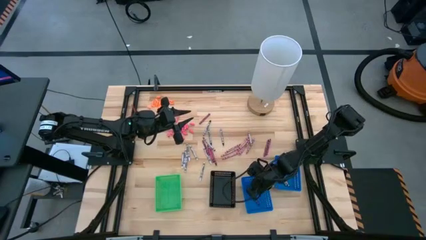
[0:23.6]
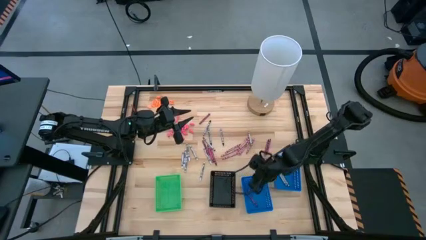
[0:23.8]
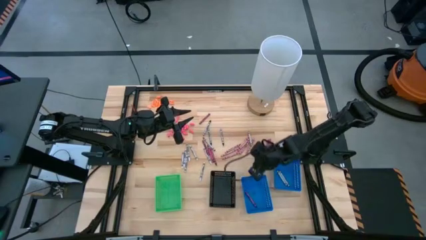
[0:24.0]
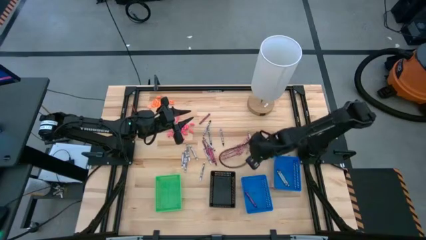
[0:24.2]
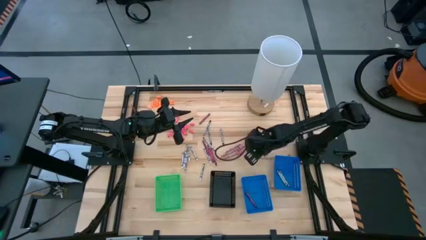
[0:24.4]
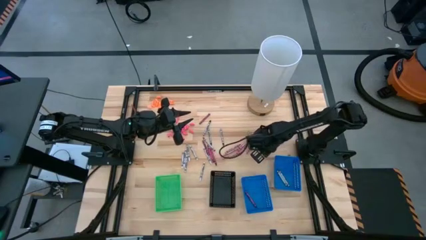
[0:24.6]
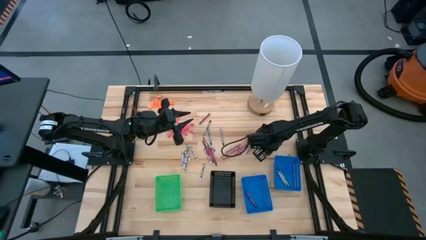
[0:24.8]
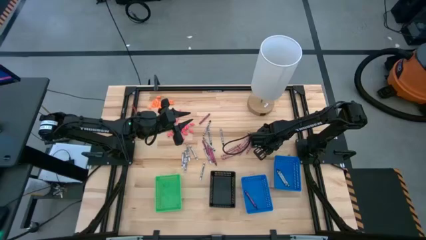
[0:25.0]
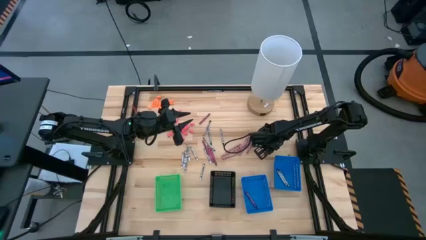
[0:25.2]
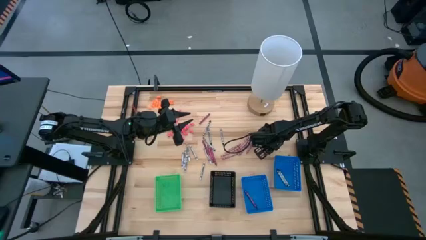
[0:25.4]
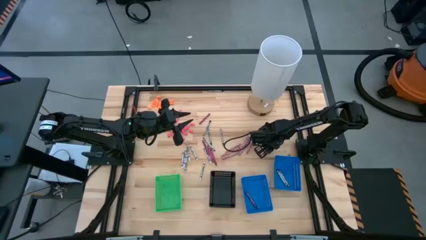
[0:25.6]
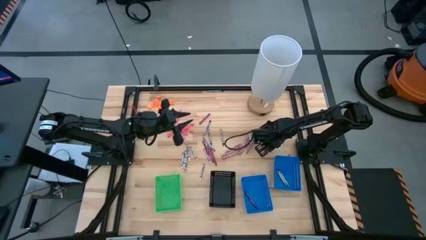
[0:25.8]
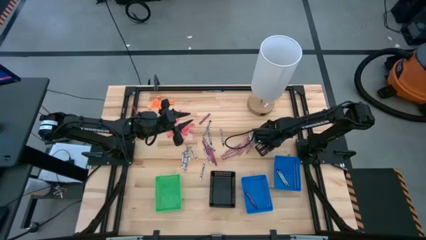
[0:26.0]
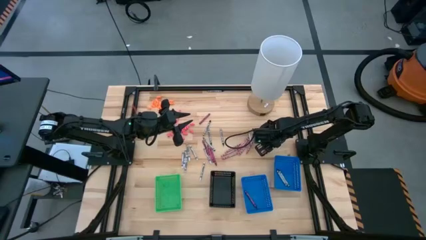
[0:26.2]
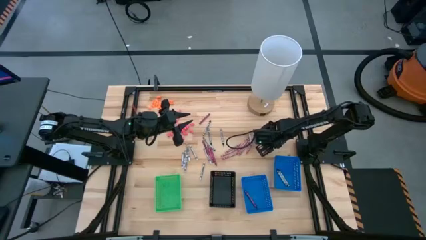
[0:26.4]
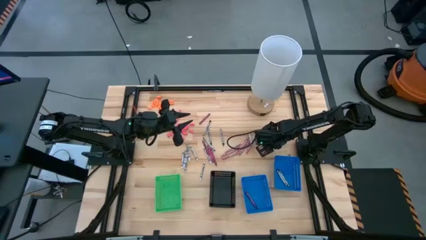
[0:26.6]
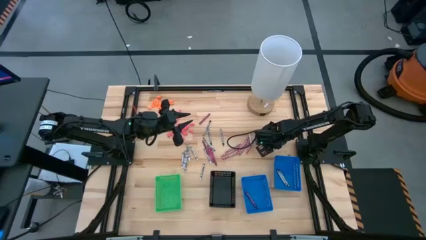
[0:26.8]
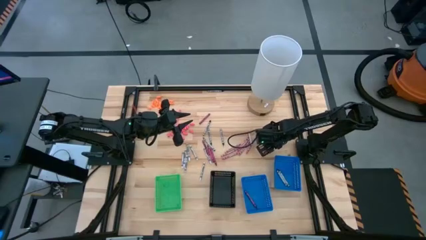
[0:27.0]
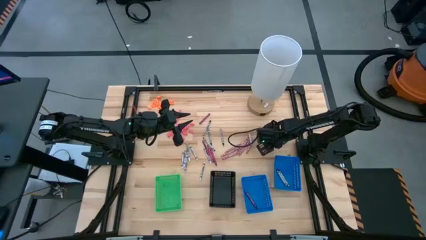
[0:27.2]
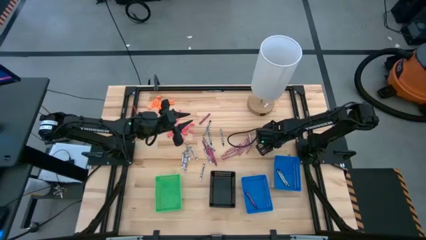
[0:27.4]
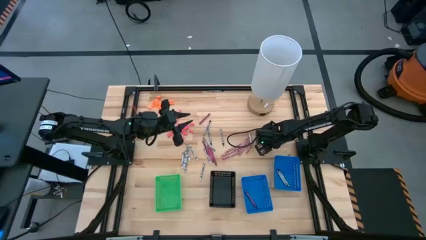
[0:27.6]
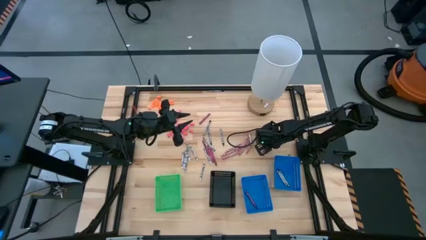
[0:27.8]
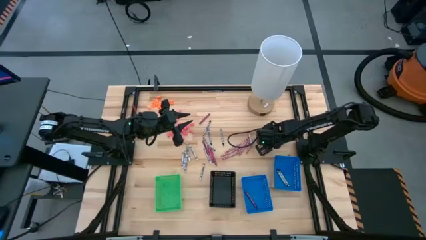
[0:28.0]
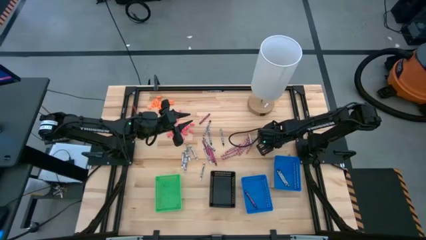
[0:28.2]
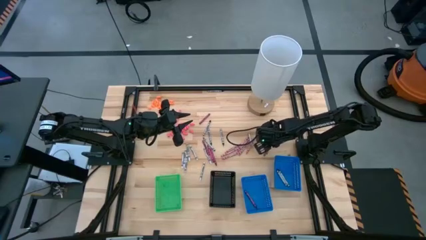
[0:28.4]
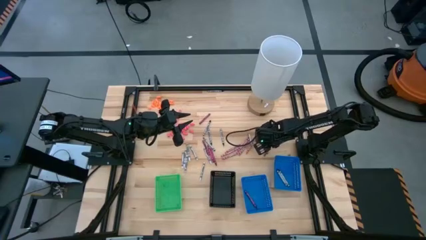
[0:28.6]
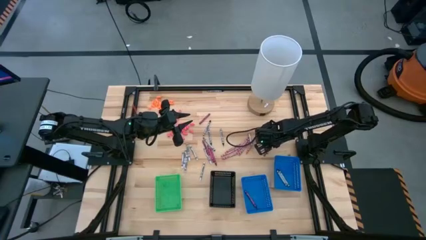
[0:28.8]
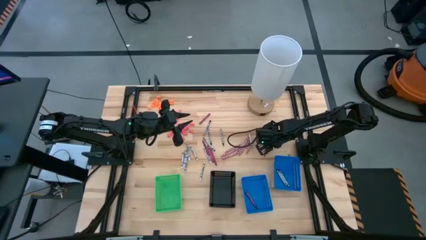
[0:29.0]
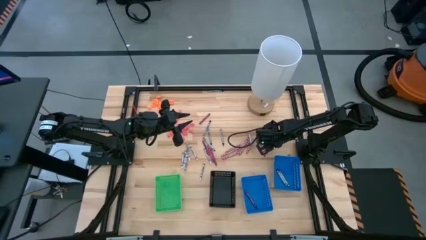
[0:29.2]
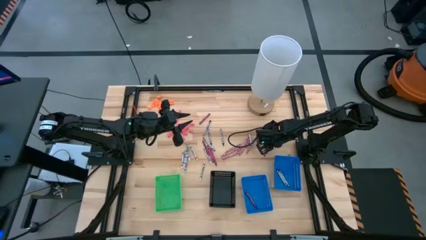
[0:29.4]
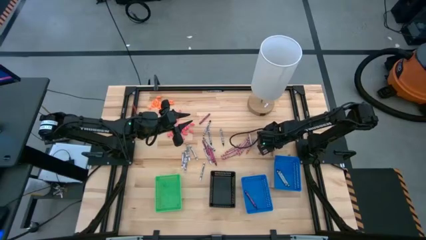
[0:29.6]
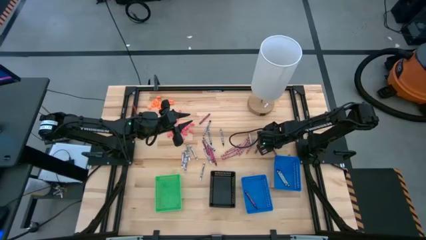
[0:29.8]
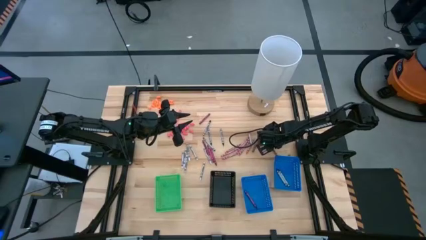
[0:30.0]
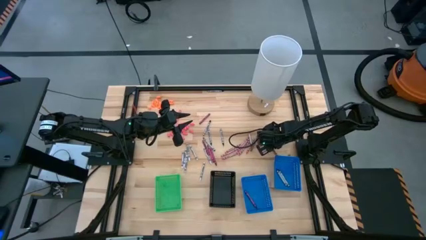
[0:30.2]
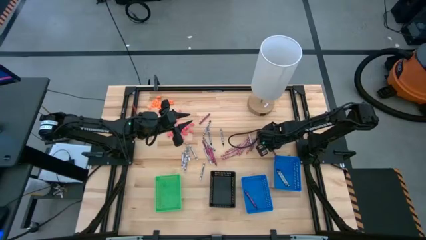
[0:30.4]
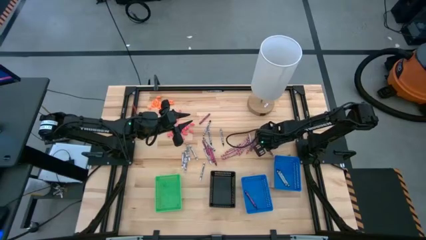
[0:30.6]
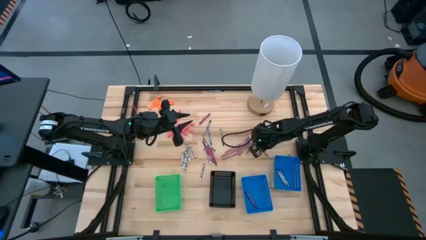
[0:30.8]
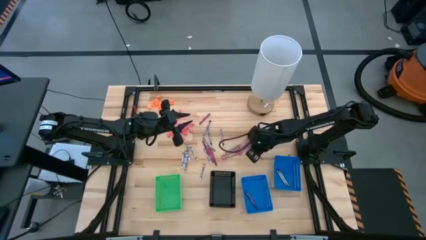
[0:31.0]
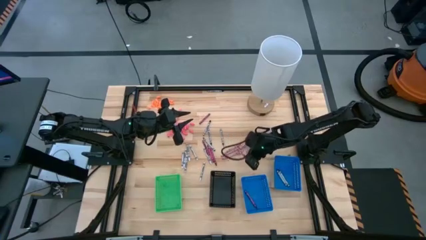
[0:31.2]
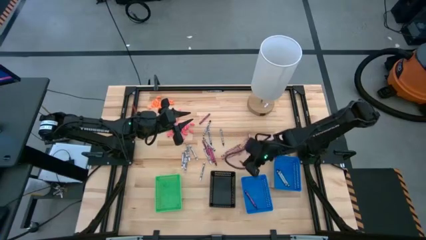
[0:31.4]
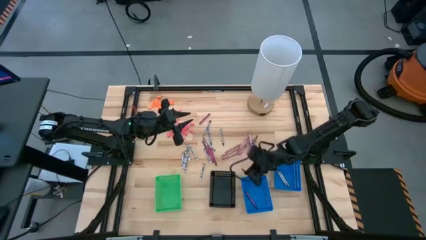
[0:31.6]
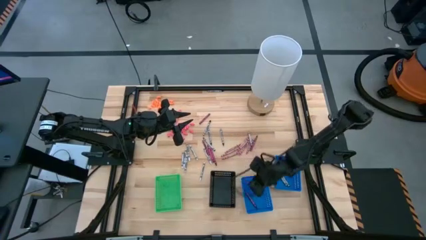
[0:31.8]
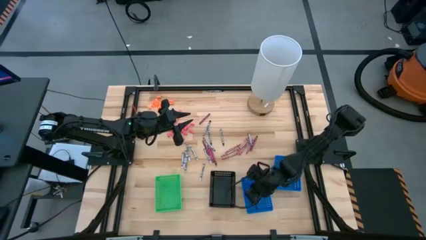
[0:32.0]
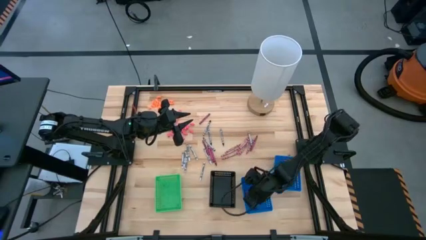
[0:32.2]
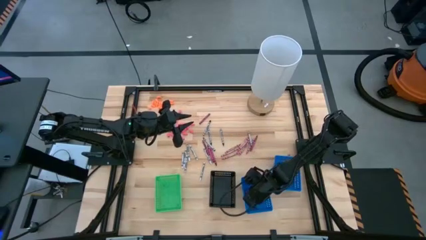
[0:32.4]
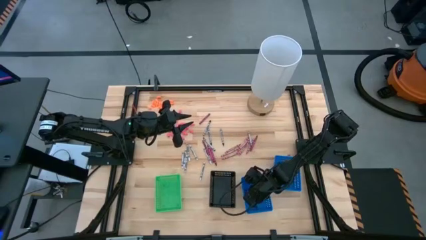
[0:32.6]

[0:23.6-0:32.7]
Task: Sort crayons
Put the red crayon into the left blue bin

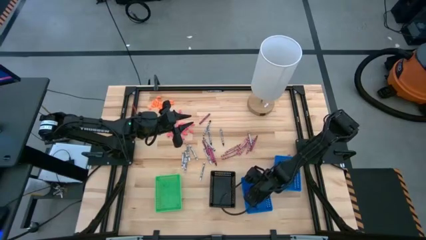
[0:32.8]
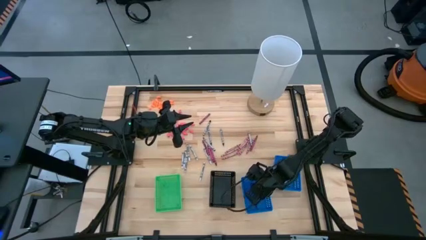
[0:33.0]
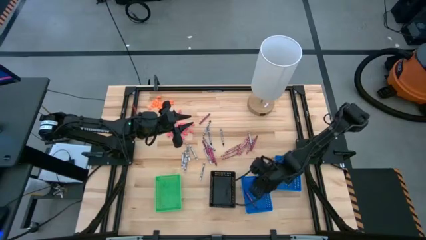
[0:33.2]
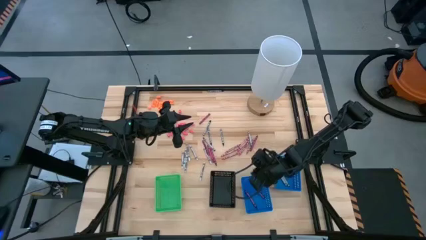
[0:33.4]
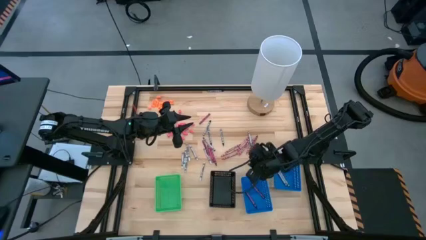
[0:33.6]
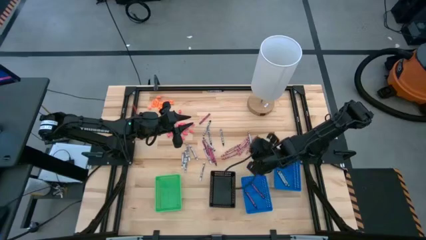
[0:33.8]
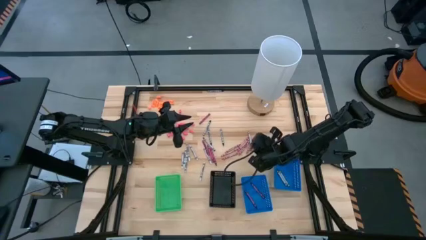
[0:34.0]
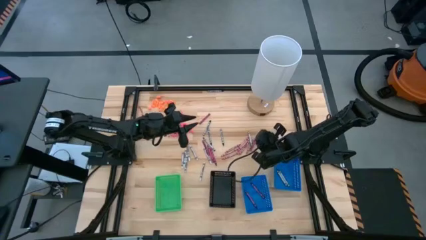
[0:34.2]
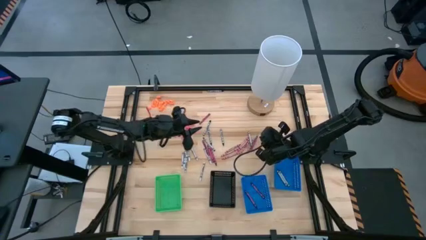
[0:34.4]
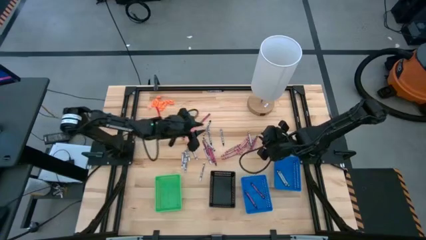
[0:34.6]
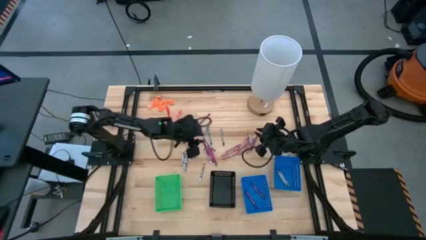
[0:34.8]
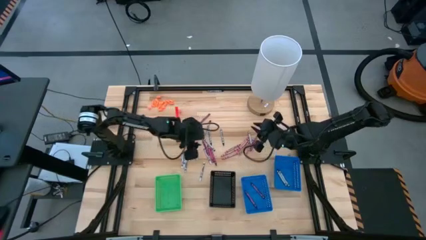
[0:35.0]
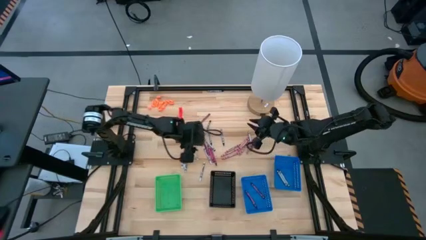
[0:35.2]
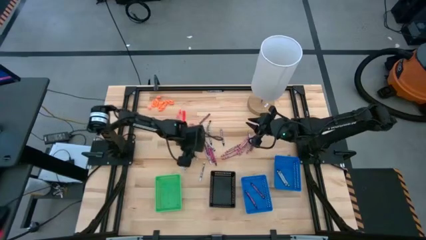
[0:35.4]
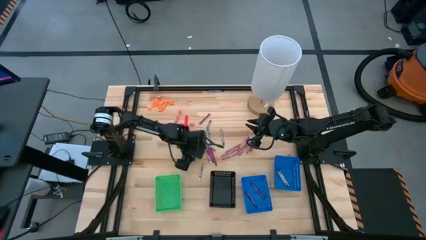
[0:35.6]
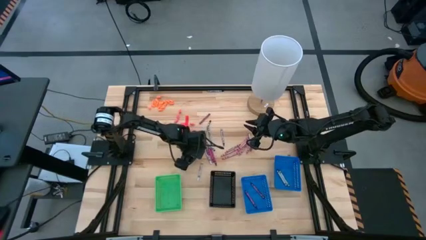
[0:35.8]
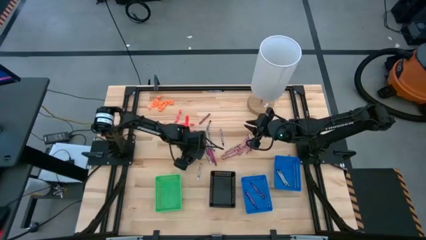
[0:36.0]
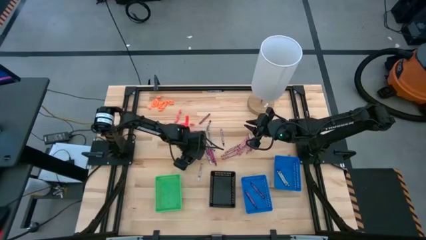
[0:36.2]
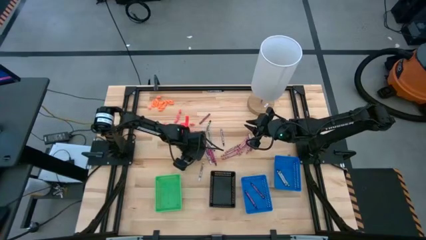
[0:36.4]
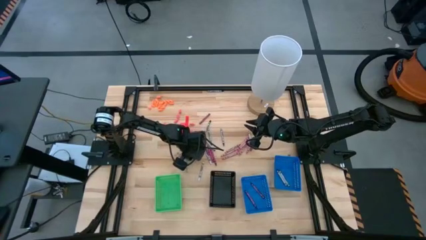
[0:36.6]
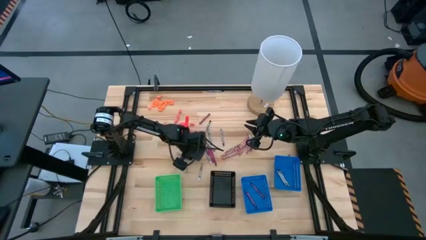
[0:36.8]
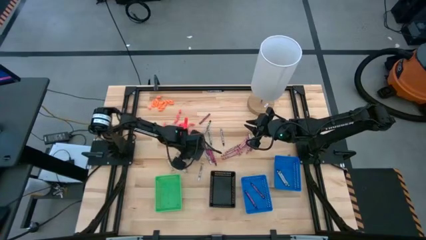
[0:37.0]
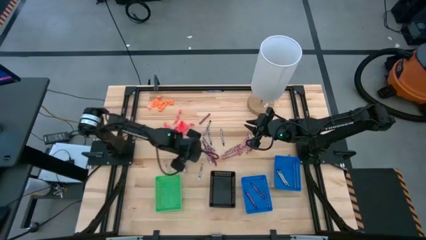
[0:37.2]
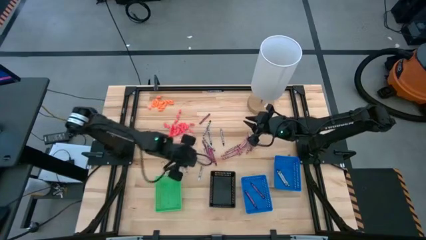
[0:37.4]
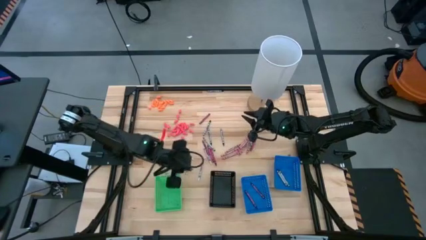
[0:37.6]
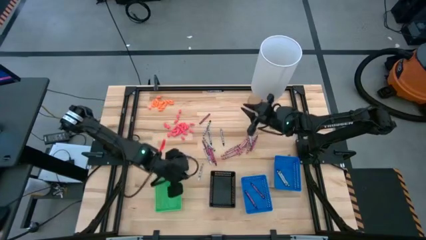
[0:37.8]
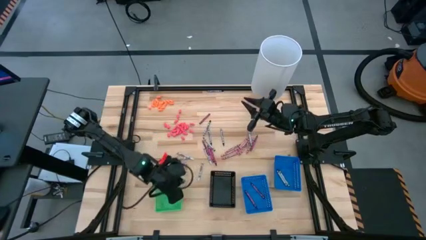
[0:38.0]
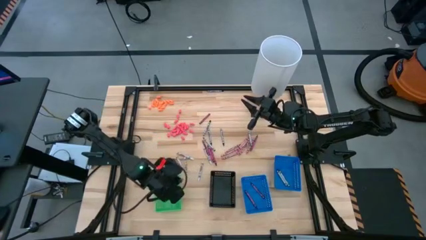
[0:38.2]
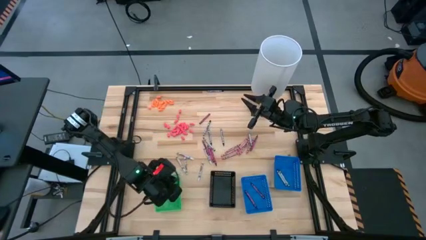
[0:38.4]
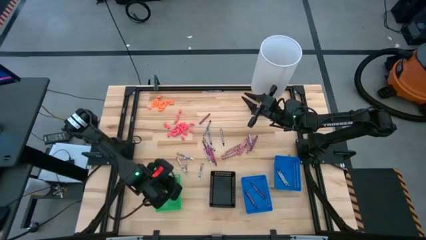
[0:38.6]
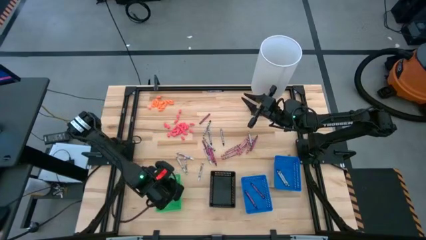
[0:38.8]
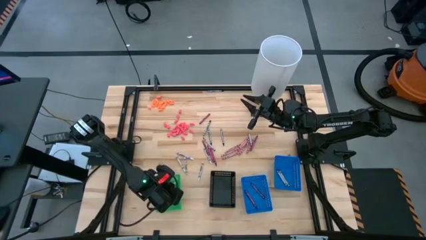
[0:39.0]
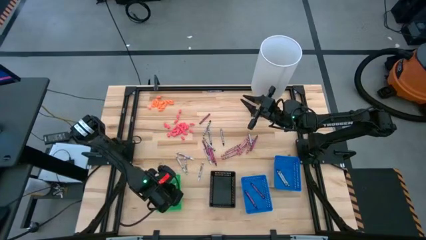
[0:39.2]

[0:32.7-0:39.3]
Put the white crayon into the green bin
